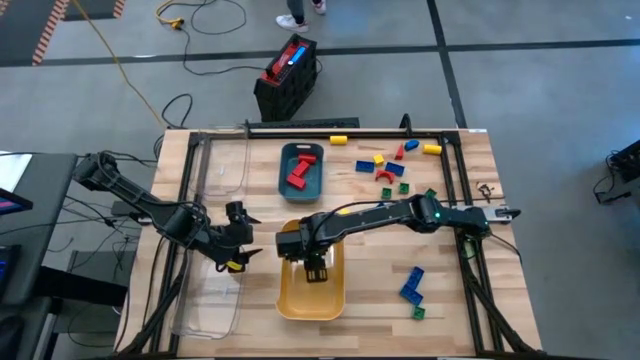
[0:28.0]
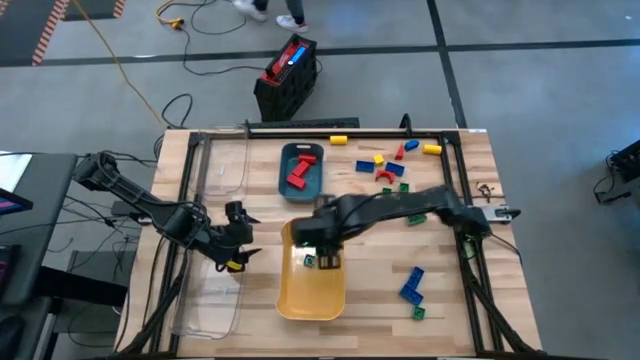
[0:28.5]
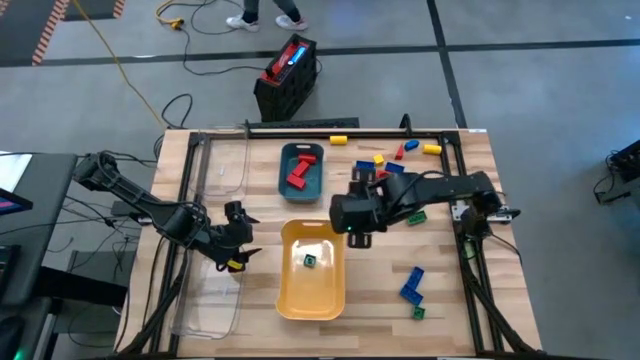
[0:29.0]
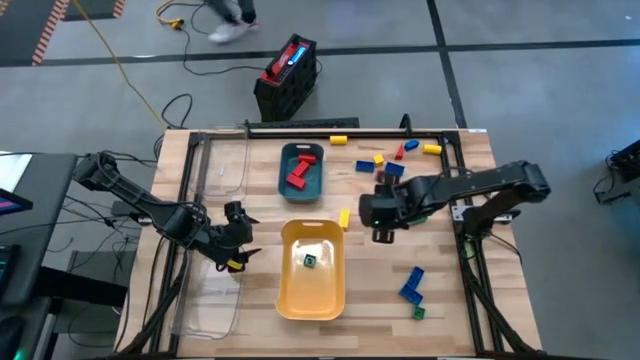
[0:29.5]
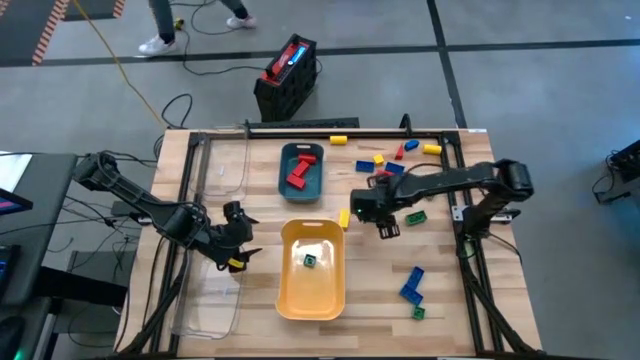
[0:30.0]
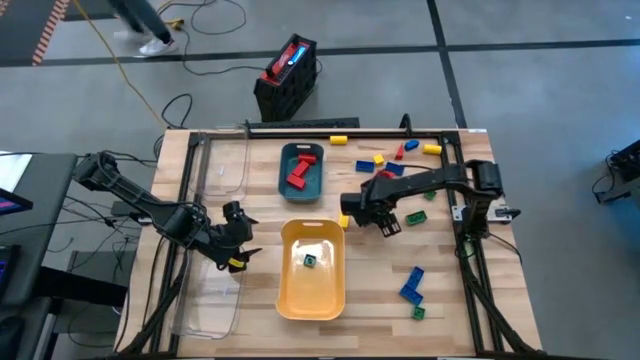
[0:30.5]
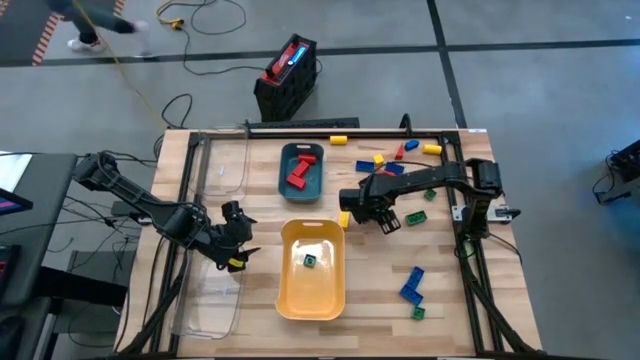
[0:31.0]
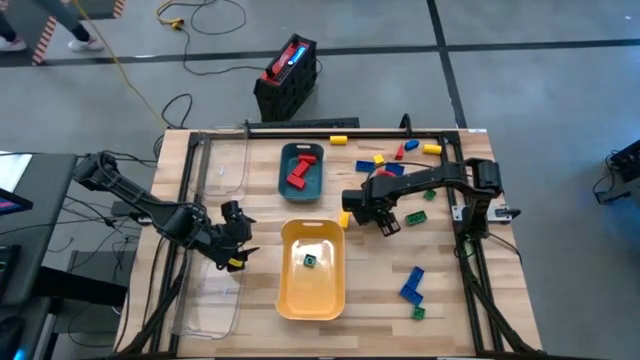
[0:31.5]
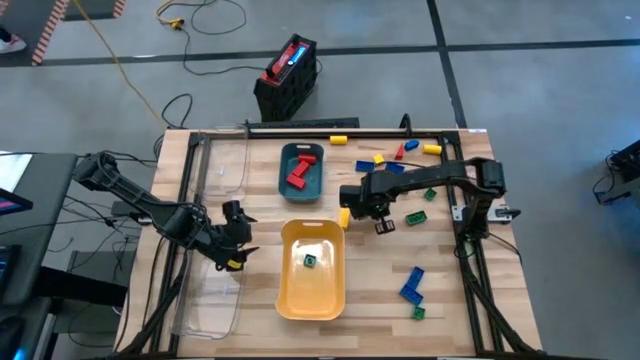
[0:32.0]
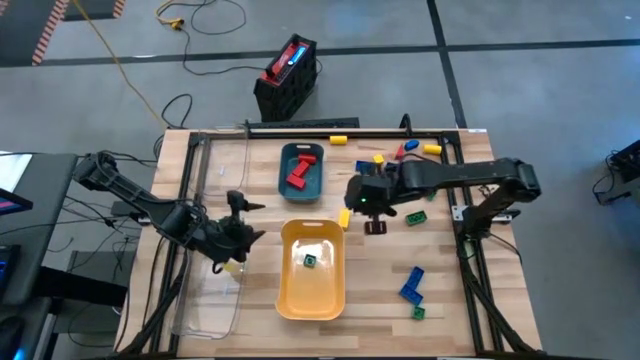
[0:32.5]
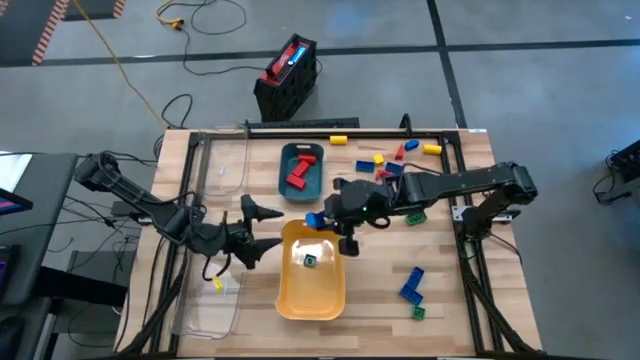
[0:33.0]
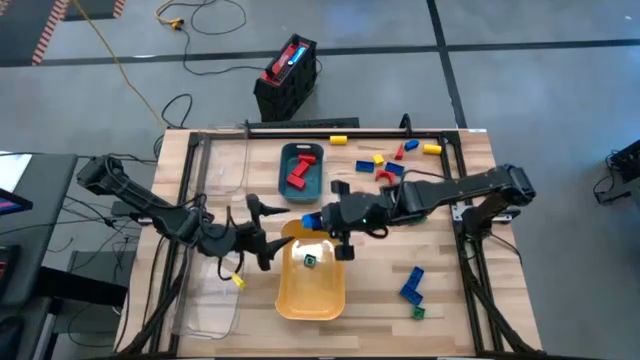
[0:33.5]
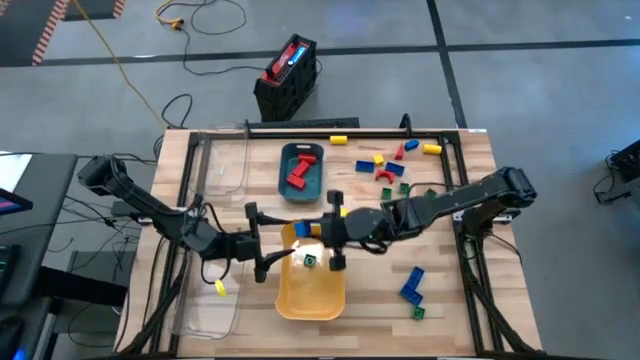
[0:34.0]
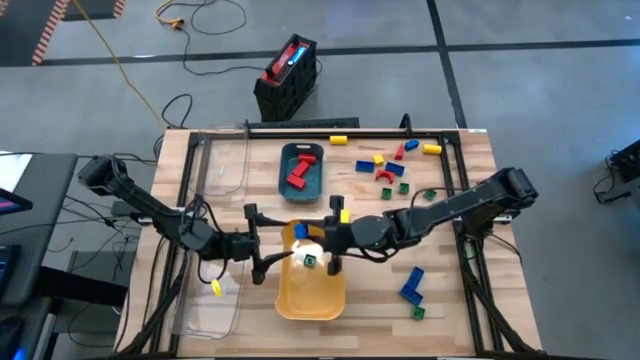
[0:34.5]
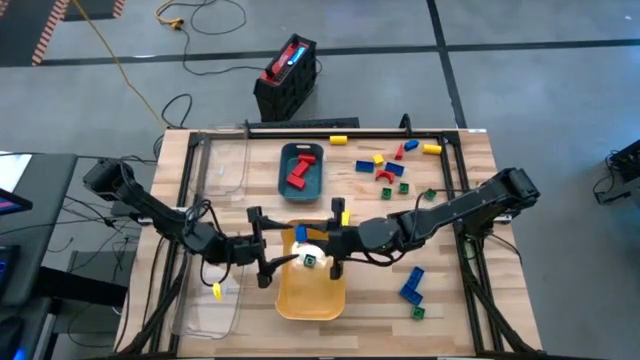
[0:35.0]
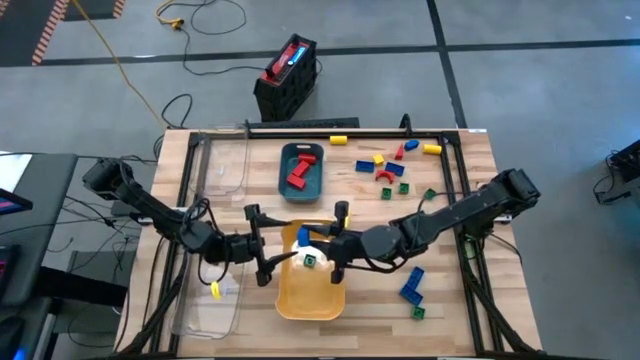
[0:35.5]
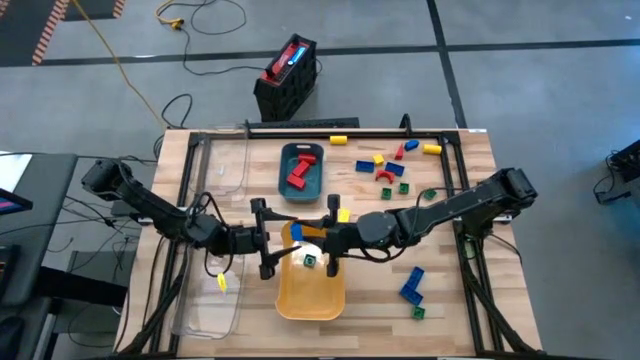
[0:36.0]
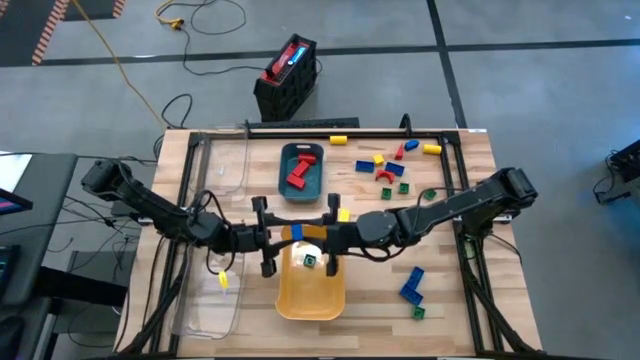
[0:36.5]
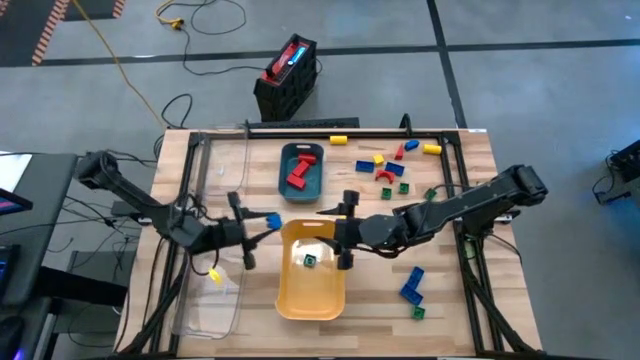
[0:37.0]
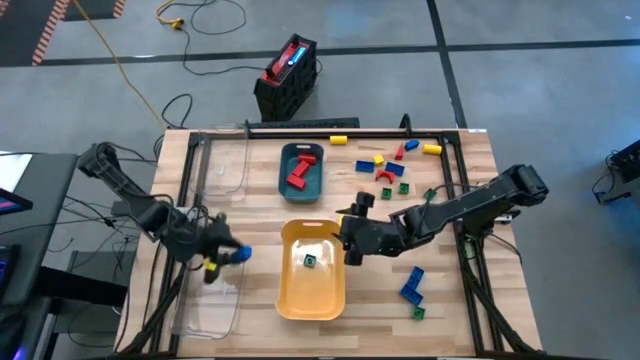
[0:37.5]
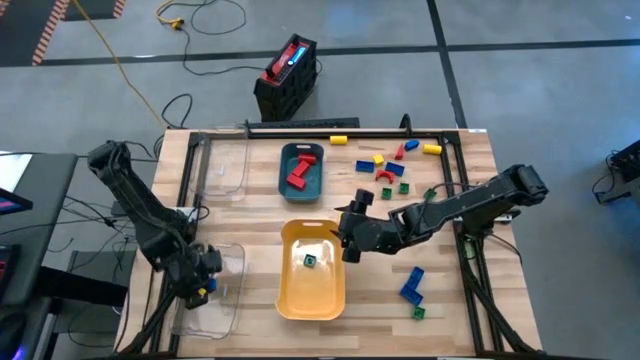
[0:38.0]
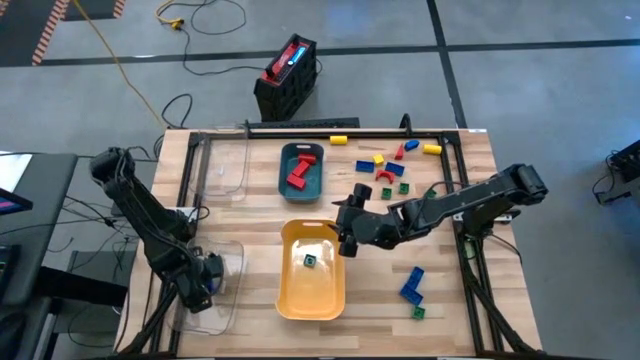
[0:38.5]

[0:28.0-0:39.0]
Task: Sort blocks
Put the rectangular blue game piece into the bottom transparent bin

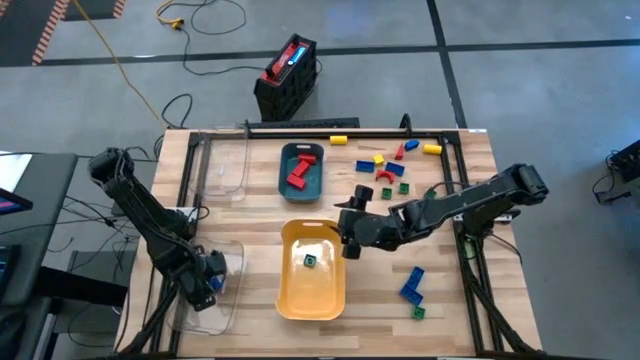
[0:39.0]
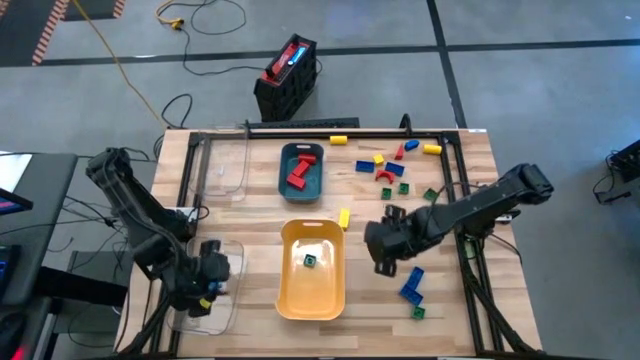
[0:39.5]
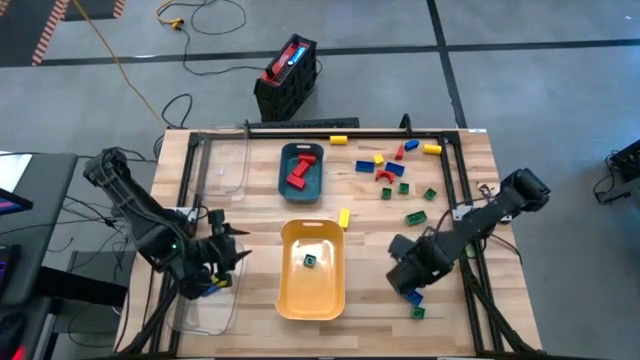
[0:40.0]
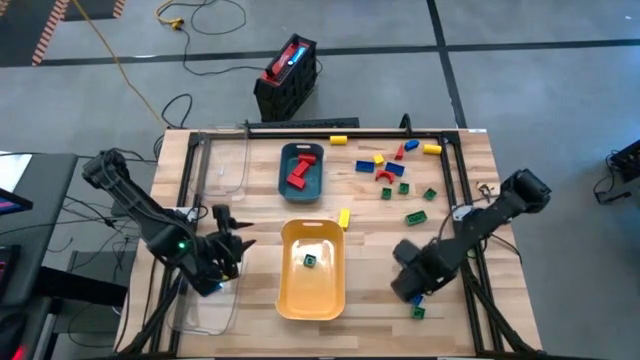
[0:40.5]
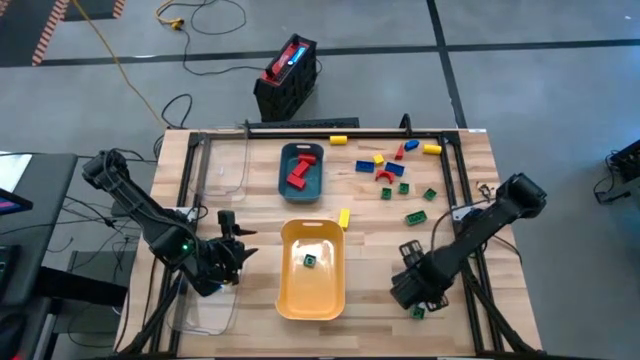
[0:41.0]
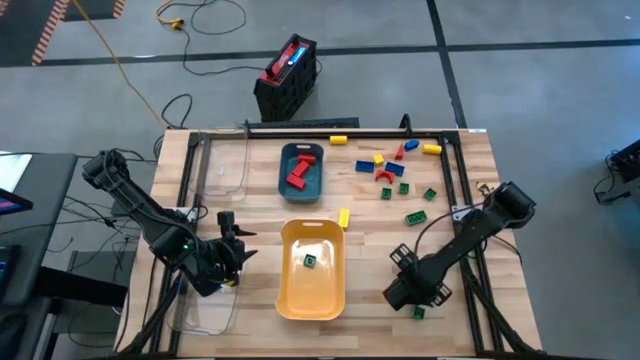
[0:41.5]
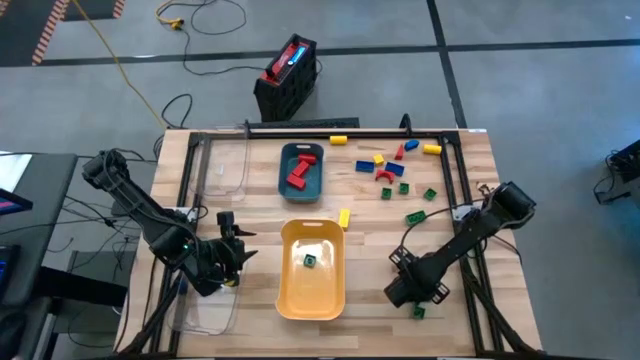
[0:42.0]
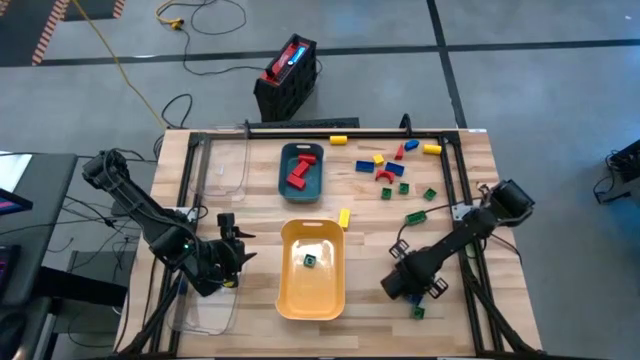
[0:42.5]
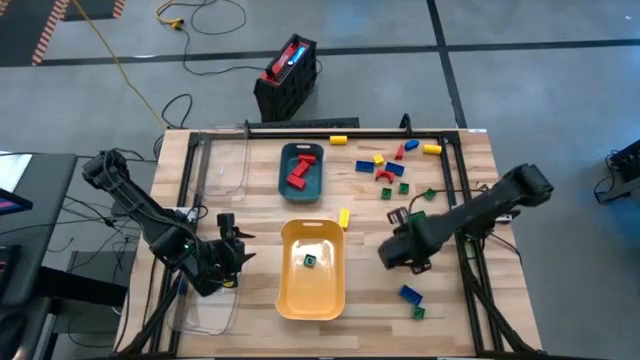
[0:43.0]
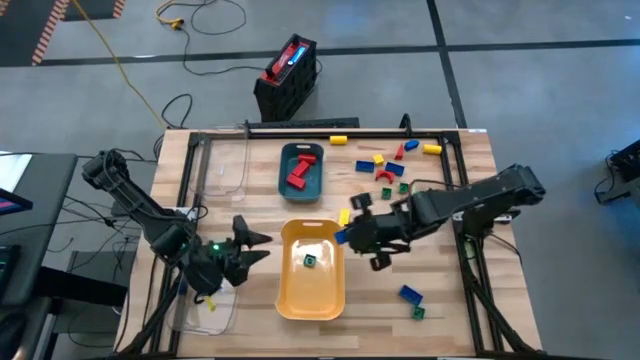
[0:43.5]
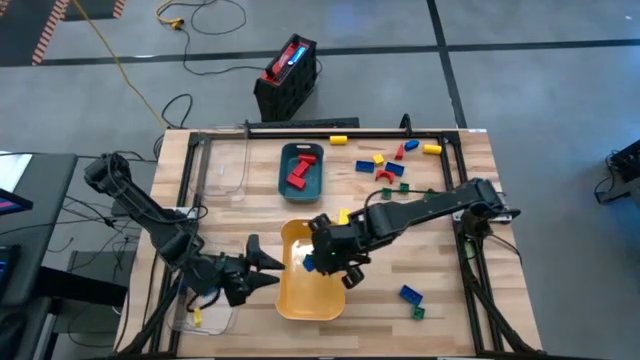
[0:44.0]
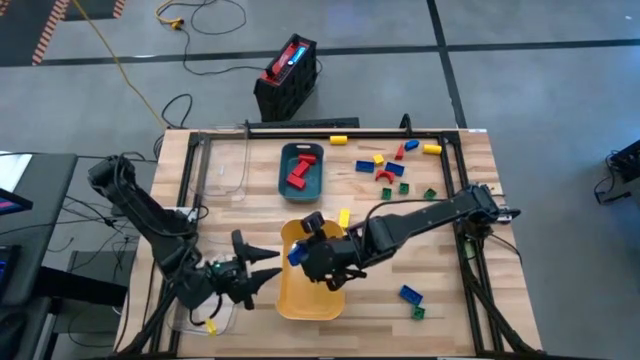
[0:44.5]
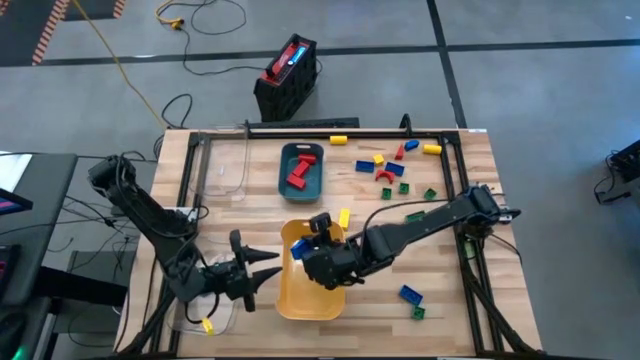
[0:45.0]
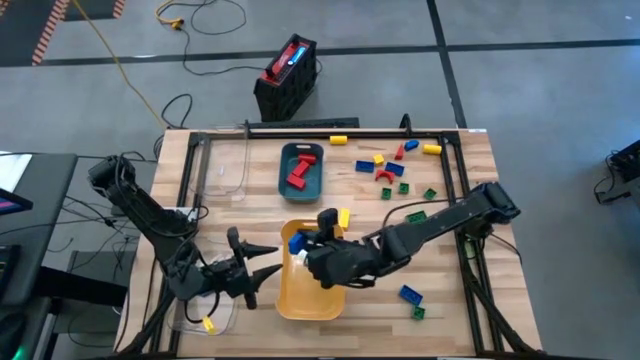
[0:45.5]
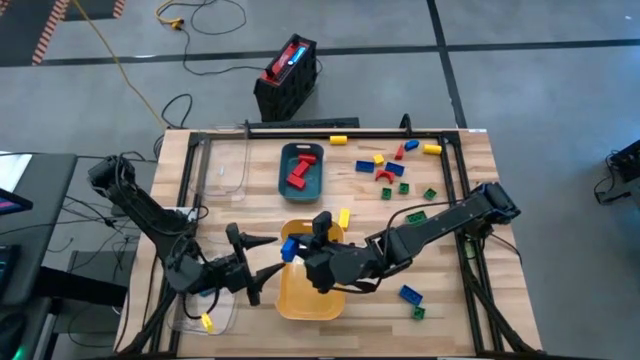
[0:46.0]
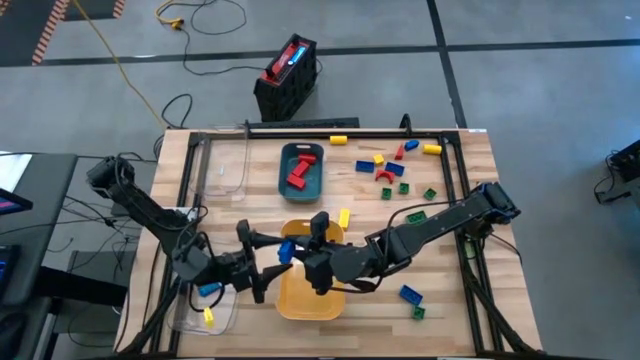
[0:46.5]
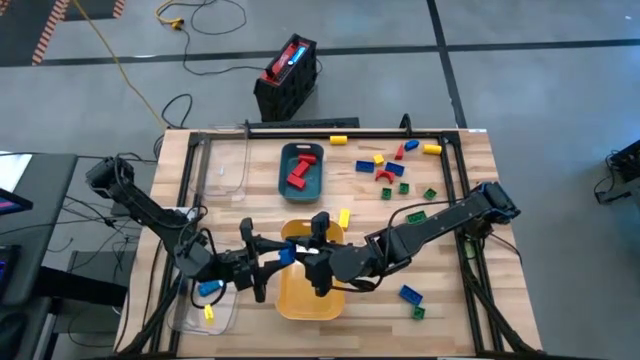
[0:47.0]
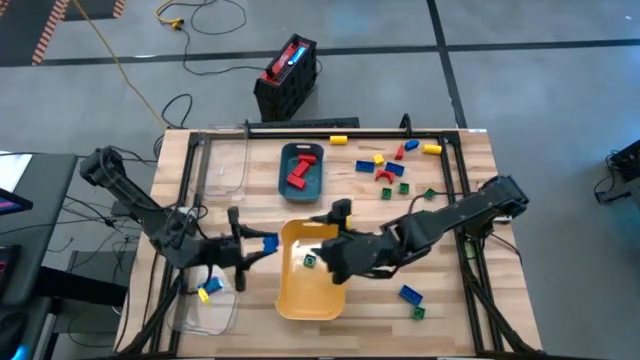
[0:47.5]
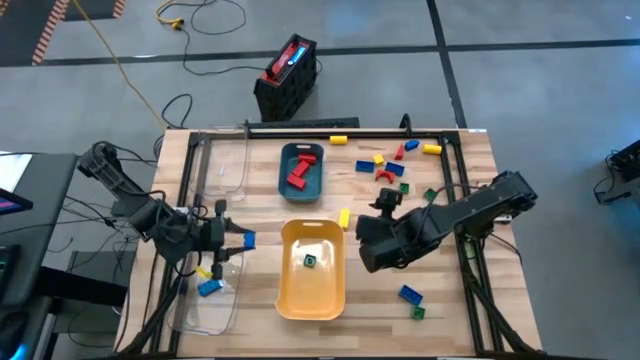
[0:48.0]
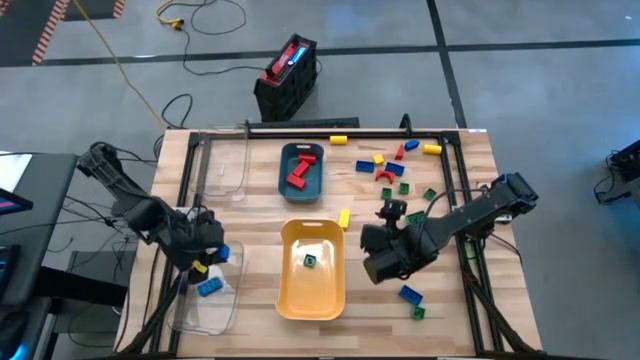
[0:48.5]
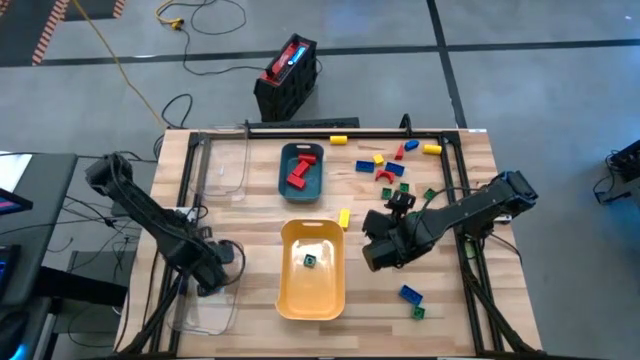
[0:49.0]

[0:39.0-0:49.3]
Put the rectangular blue game piece into the bottom transparent bin
